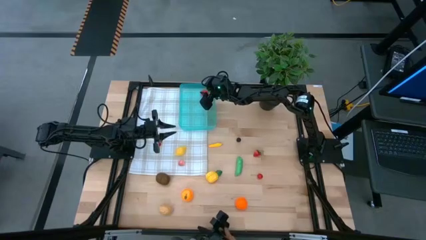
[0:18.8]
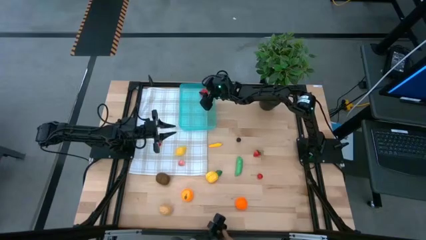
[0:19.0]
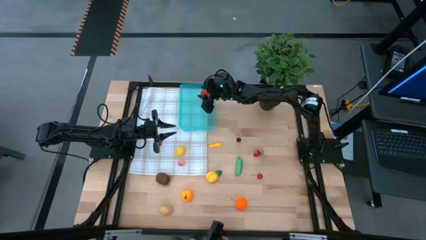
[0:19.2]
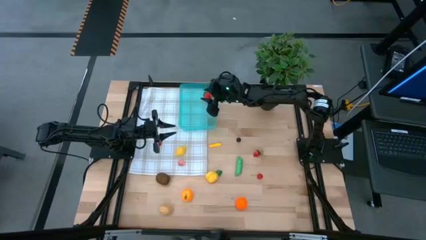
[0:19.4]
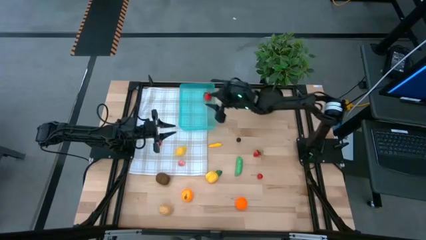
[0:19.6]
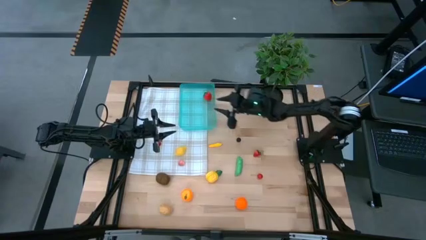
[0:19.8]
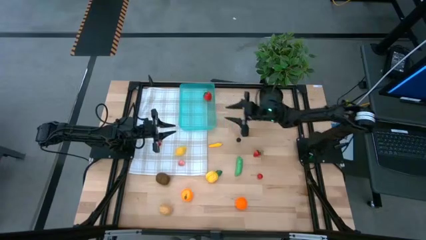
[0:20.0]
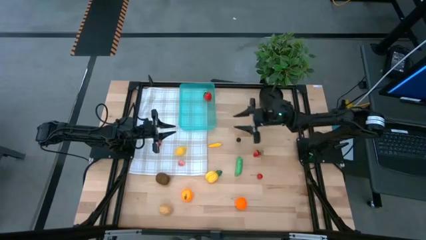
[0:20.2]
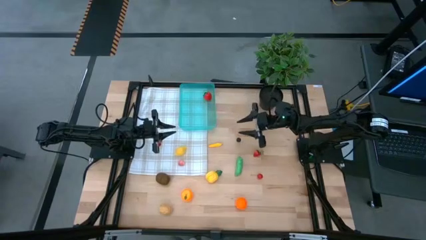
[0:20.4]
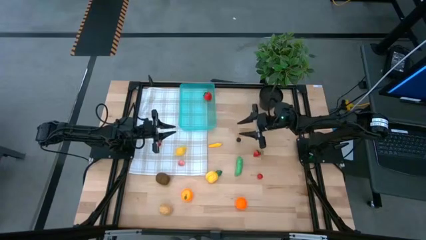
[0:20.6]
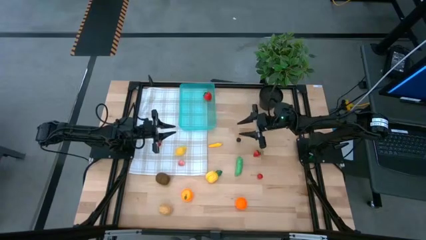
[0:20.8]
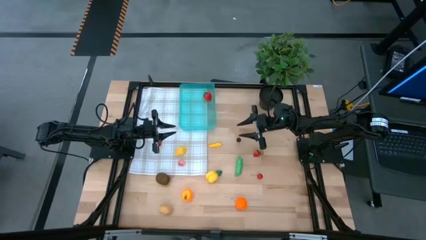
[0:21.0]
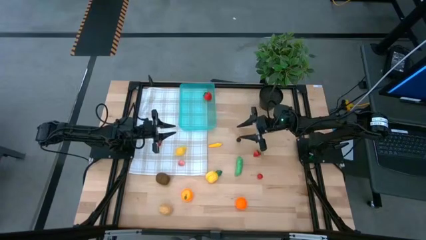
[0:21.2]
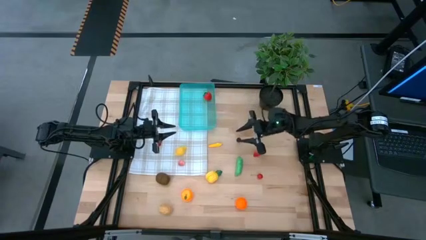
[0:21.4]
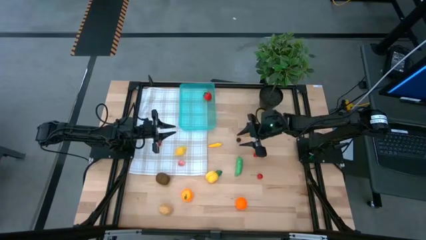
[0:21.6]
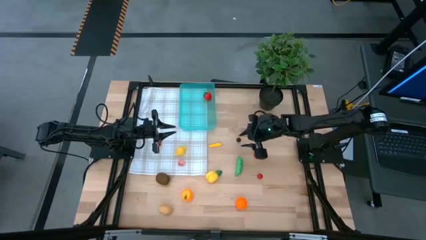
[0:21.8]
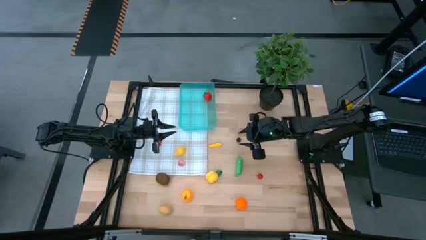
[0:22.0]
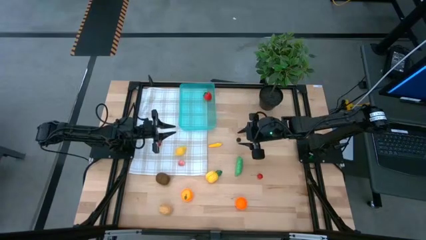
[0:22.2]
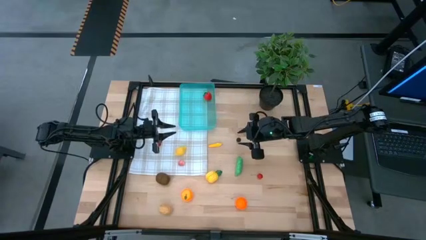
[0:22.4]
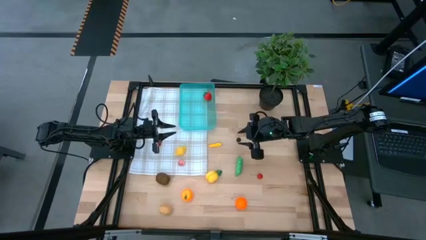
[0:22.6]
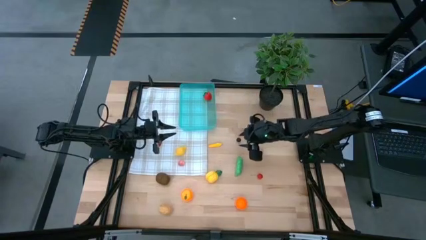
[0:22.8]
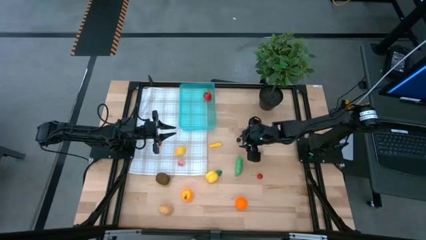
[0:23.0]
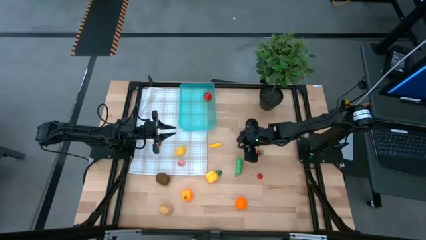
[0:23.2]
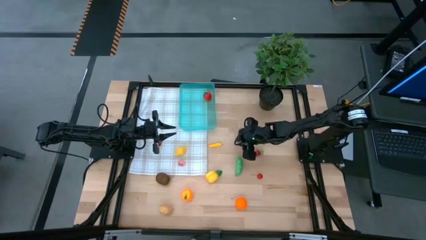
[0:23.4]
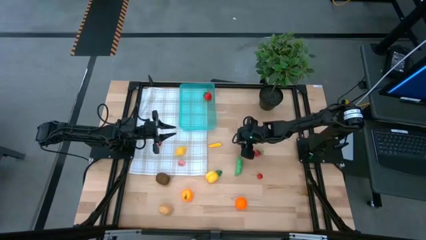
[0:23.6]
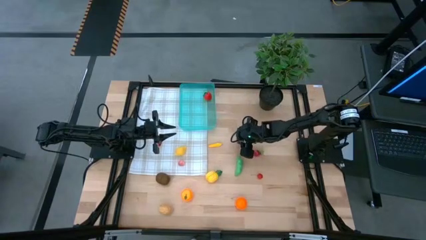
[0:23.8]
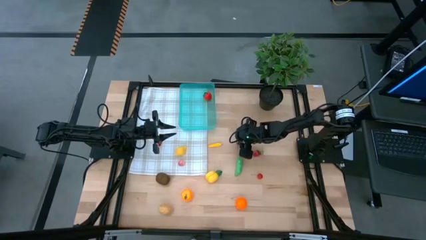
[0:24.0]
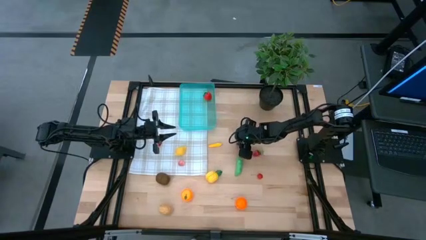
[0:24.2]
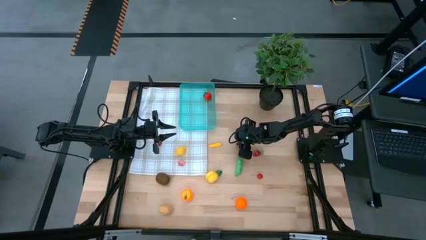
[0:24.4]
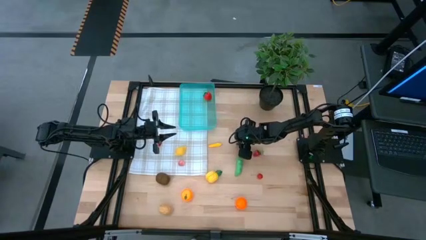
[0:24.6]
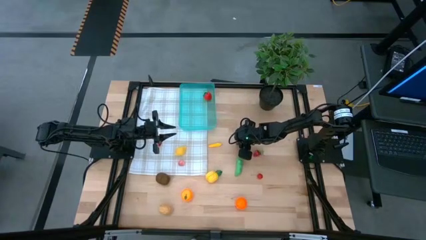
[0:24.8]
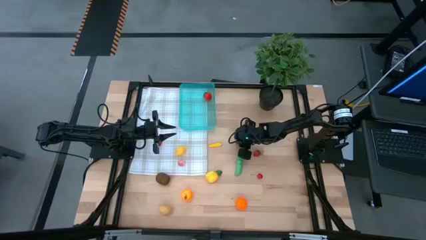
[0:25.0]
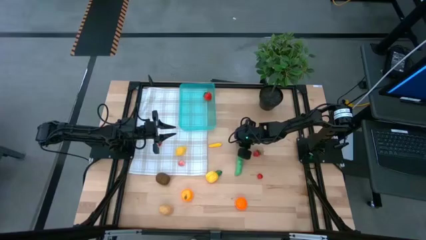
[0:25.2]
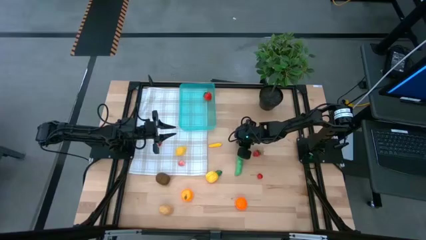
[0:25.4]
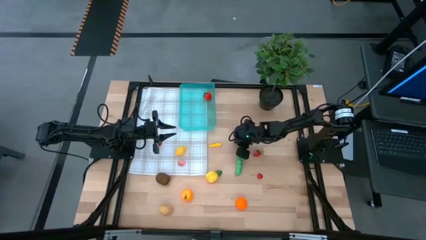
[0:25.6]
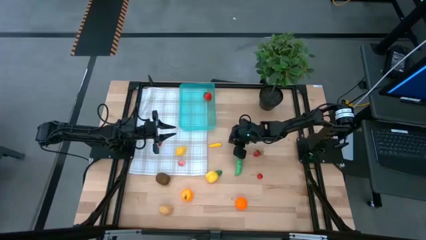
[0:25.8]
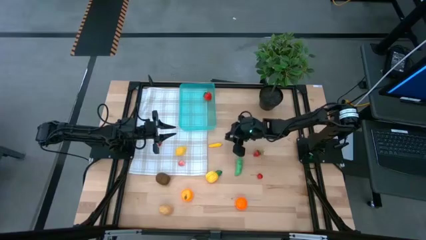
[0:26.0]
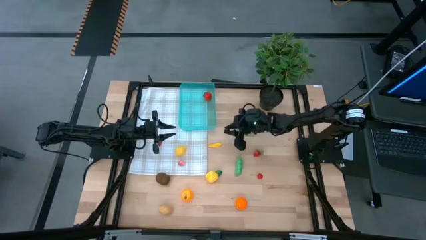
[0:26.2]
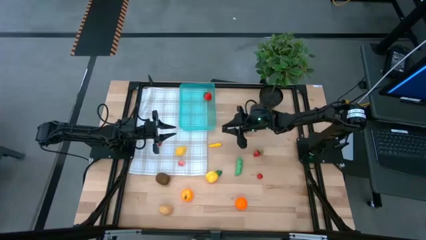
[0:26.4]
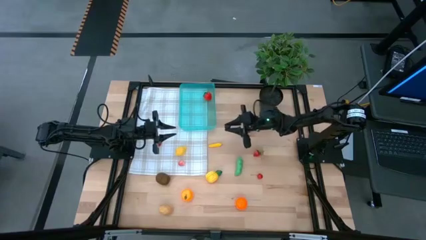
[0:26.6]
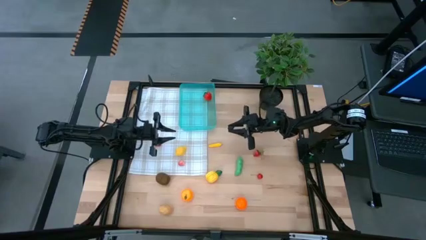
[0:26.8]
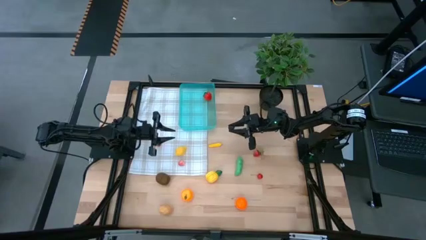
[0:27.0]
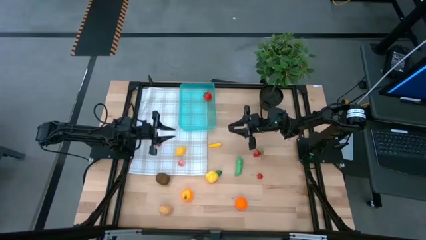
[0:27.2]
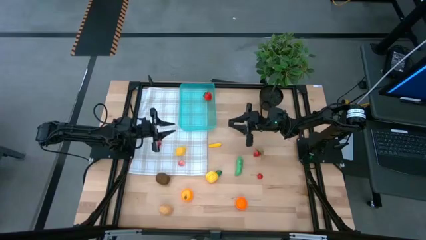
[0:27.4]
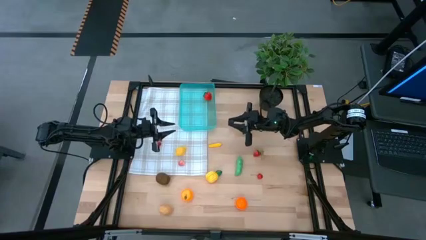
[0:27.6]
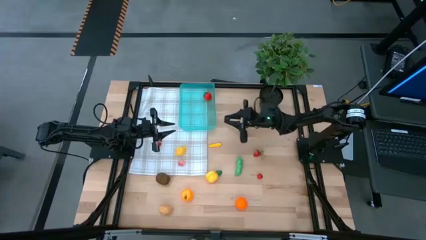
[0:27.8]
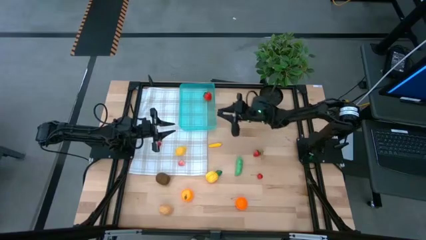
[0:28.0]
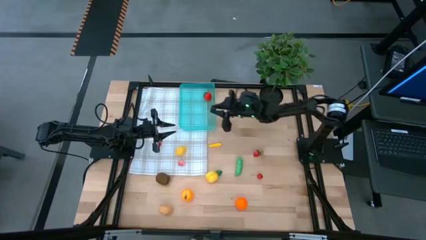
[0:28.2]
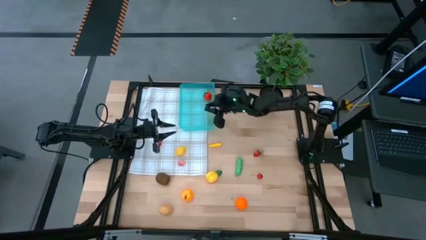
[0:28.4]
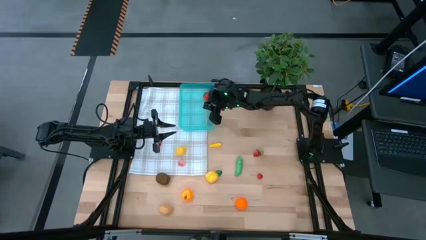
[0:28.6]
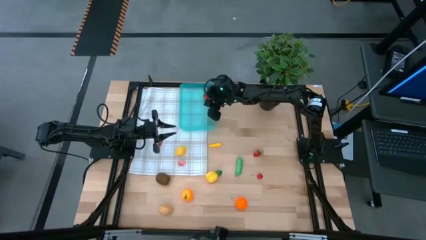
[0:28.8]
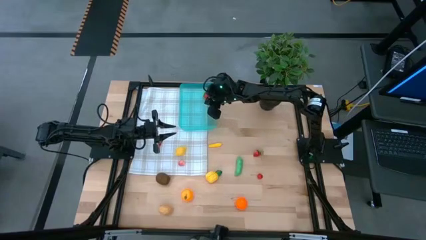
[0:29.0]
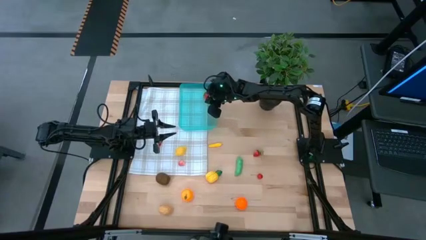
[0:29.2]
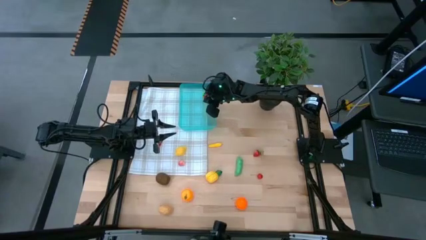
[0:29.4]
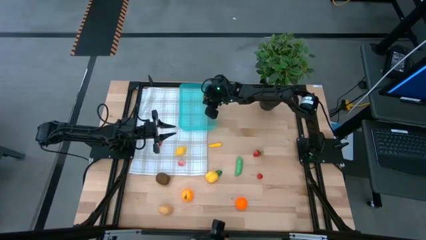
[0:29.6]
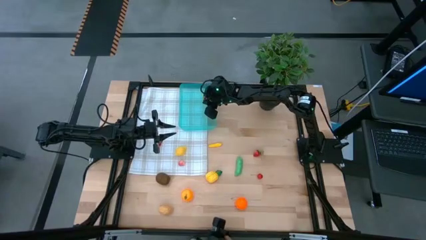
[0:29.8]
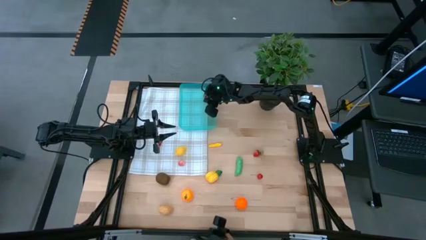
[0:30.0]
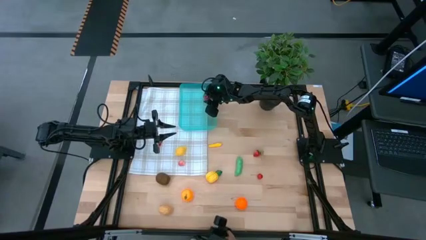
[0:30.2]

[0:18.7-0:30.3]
Task: Pick and placing Produce into tupperware
Put the blackberry into the blue bin

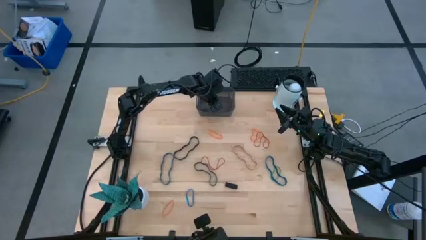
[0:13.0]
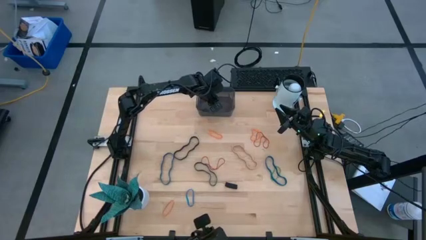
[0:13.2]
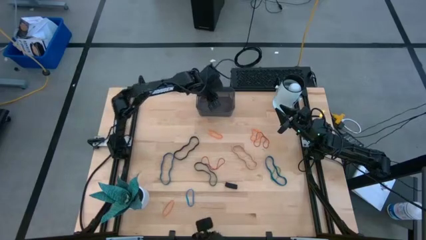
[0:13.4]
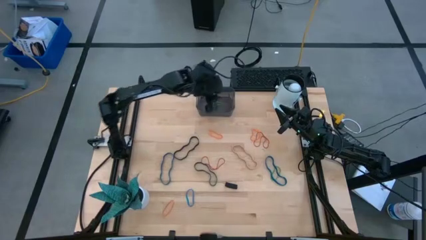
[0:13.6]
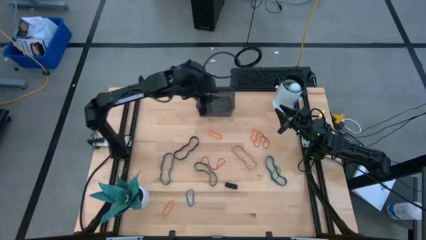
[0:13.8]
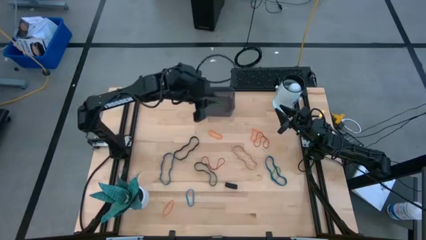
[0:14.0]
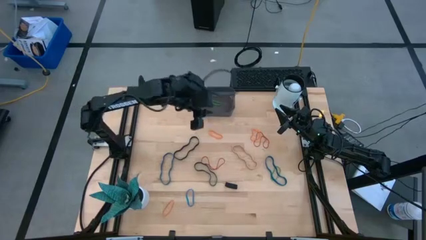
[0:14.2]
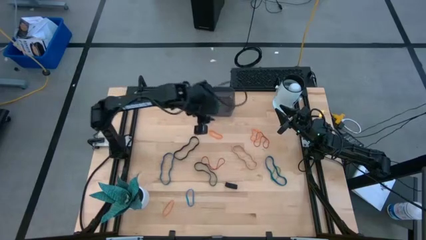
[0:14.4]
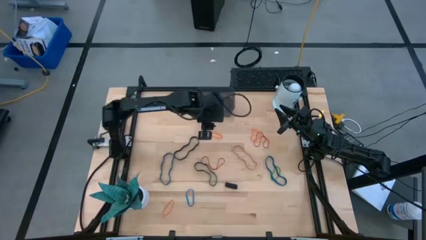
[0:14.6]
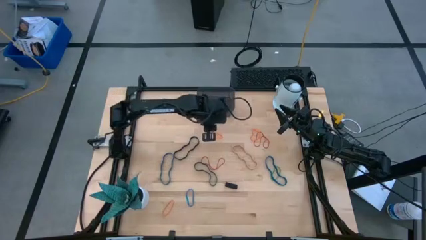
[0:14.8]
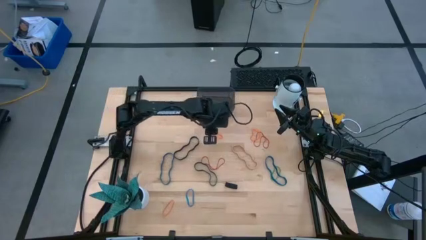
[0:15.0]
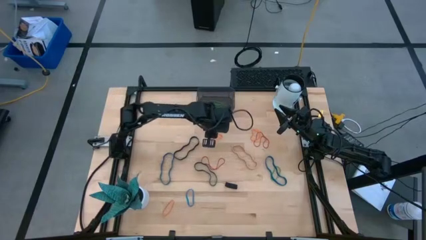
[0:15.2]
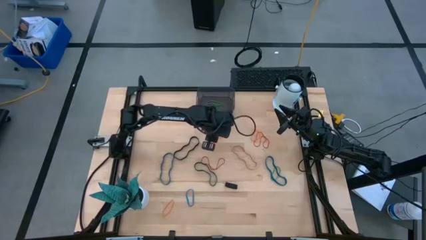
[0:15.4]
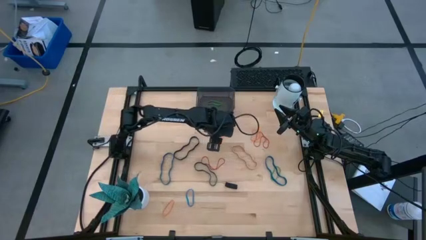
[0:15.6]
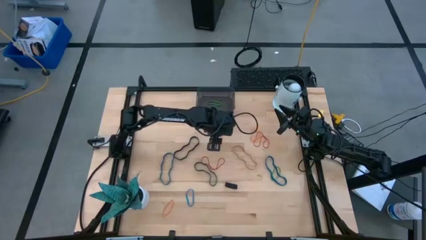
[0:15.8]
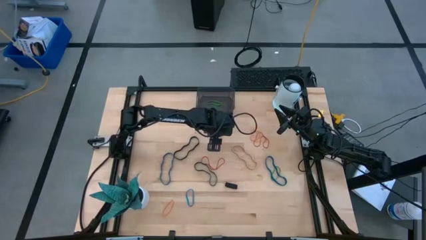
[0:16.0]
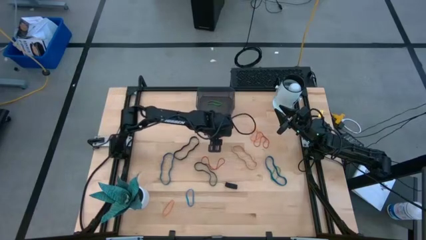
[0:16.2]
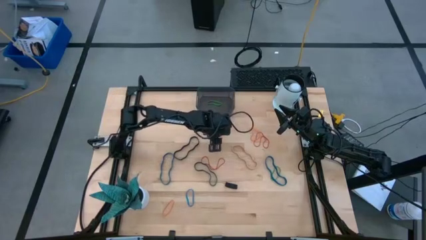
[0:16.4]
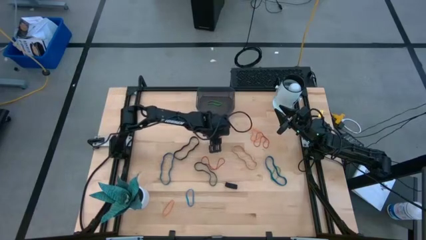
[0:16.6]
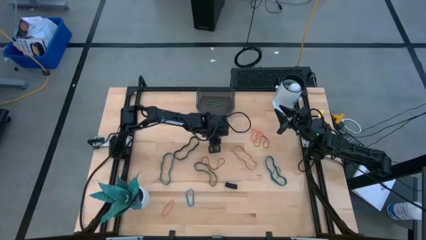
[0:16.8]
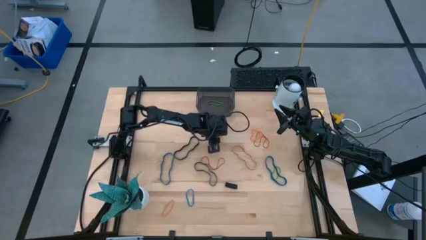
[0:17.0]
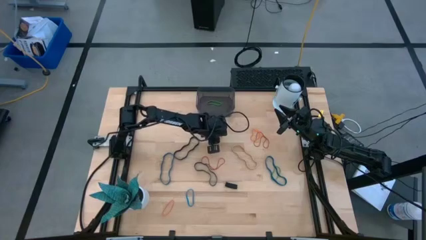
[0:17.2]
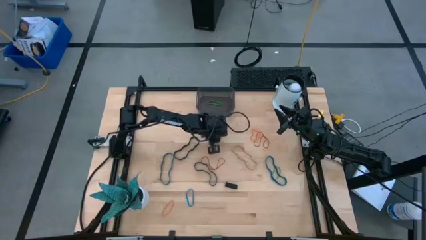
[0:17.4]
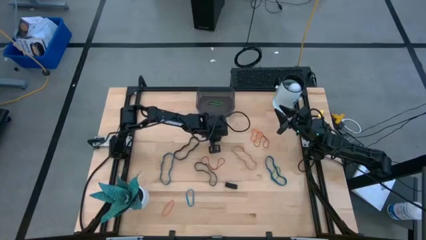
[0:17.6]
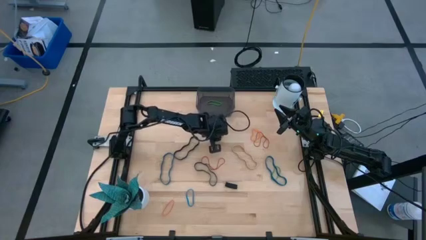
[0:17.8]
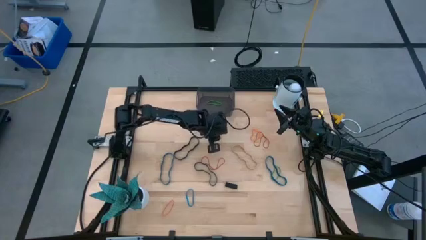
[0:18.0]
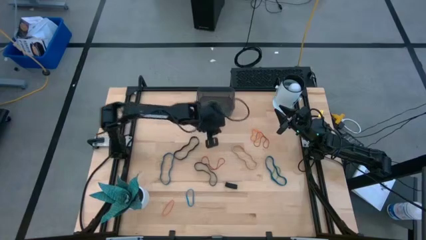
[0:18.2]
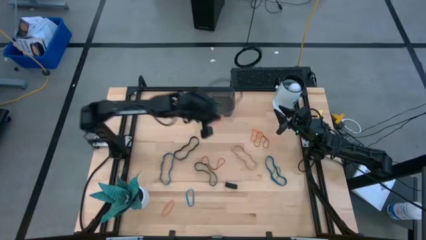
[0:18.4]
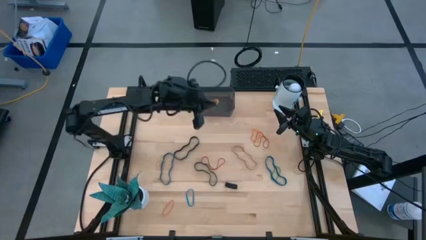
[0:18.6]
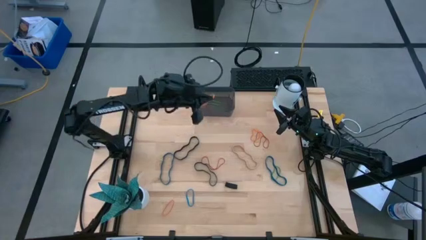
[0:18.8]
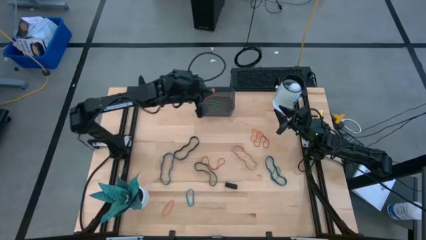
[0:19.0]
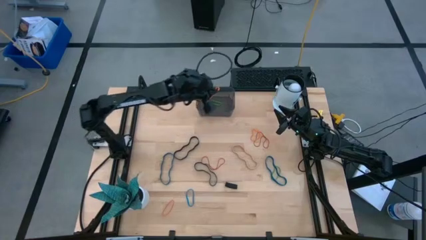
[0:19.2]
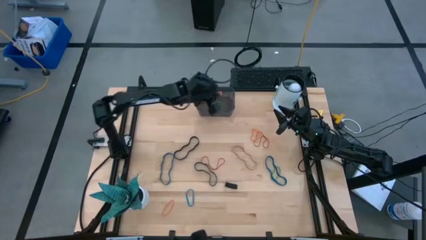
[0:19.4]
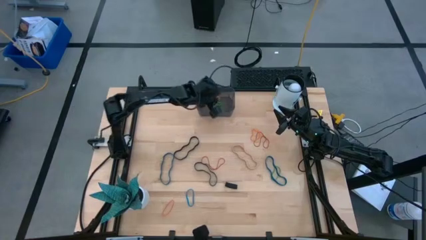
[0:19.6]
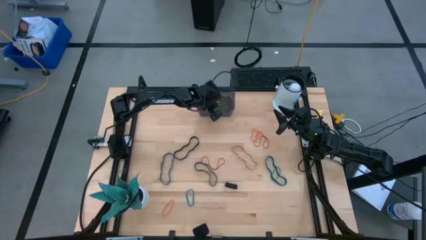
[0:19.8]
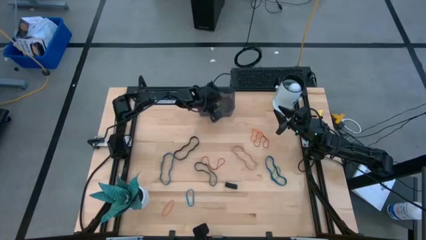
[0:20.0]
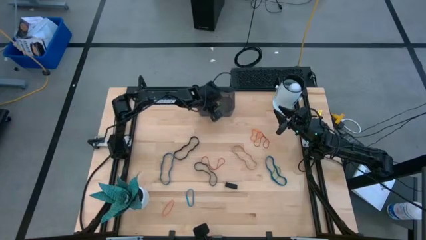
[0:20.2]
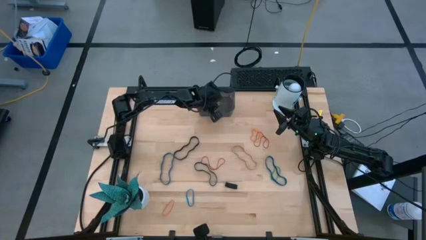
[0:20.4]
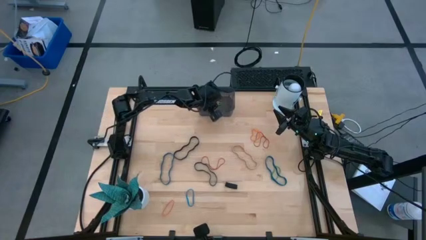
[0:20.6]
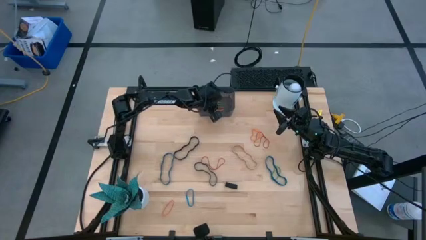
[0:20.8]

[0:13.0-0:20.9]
Task: Pick and place rubber bands into bin
Put the top left orange rubber band into the black bin
